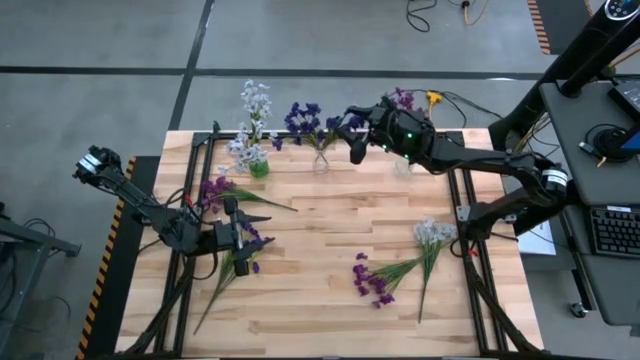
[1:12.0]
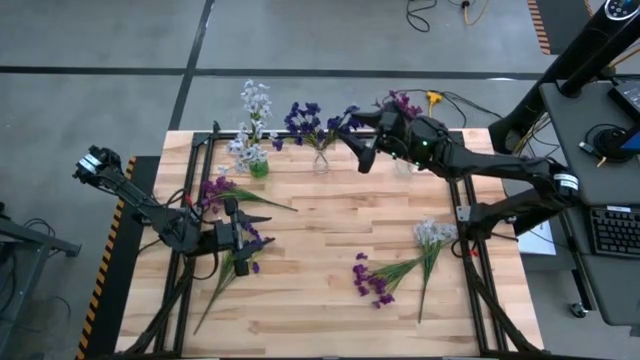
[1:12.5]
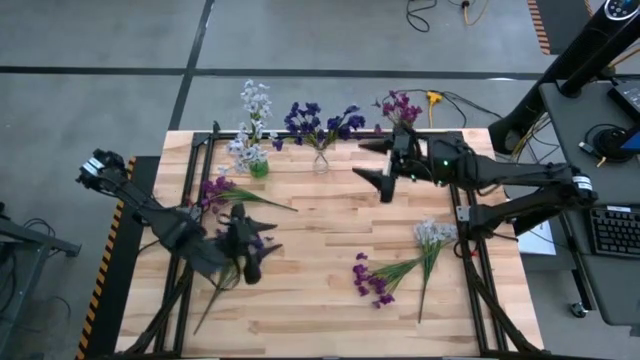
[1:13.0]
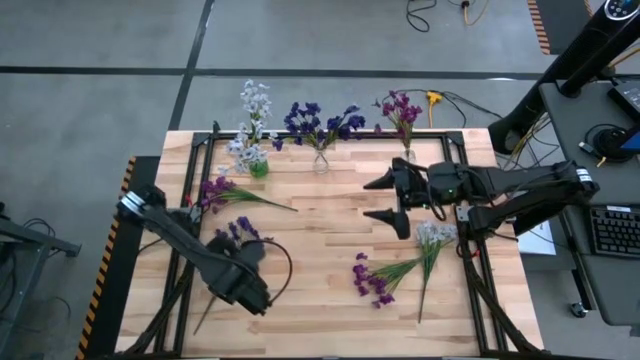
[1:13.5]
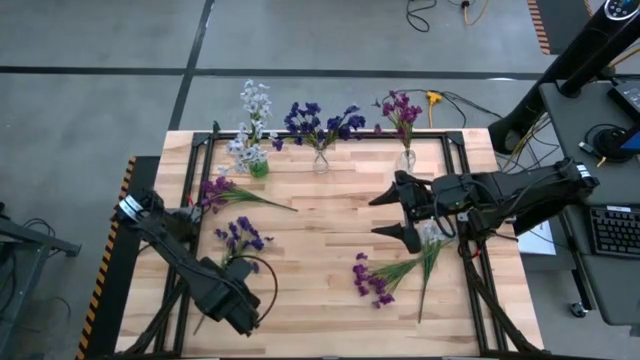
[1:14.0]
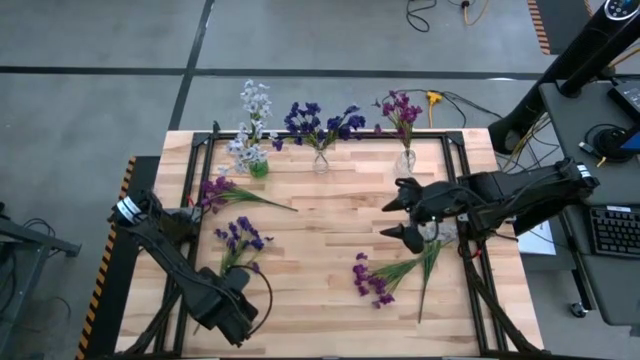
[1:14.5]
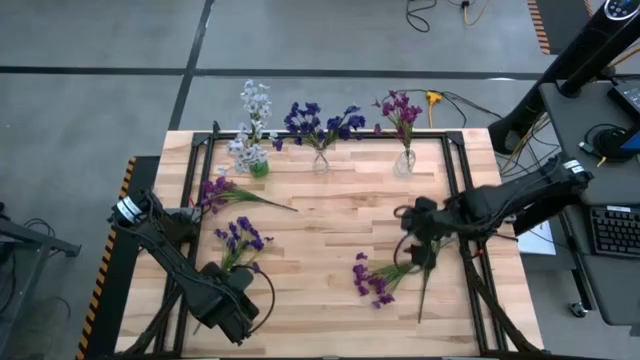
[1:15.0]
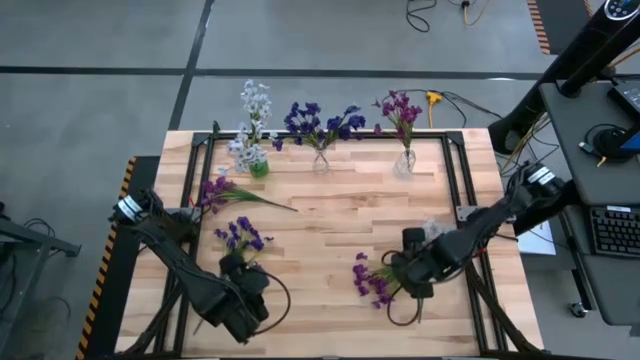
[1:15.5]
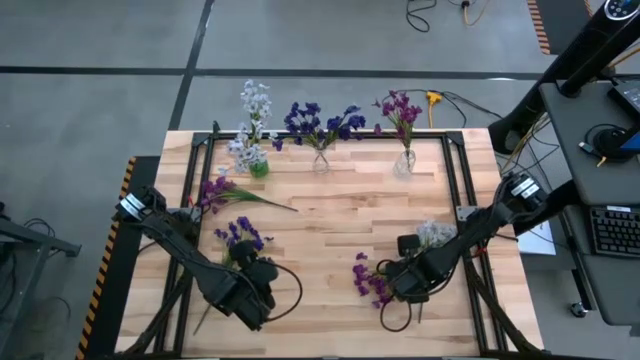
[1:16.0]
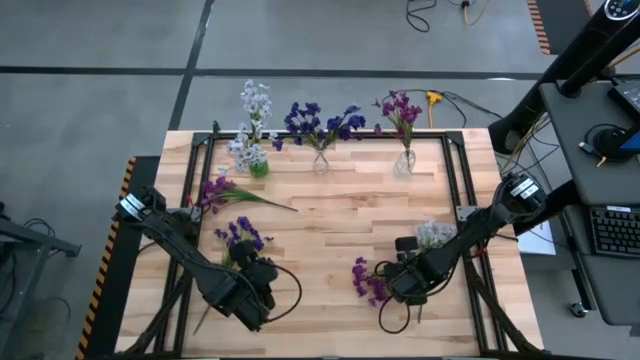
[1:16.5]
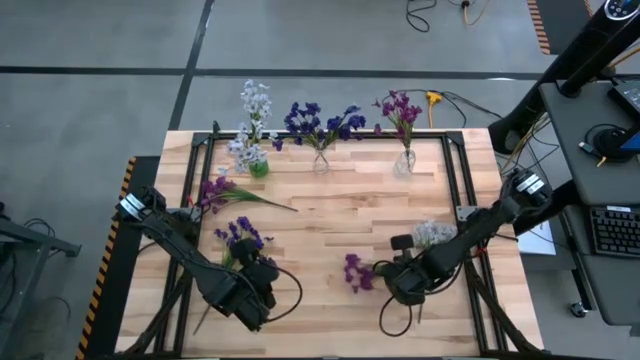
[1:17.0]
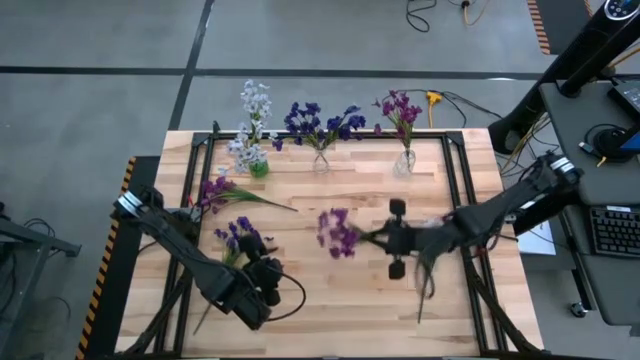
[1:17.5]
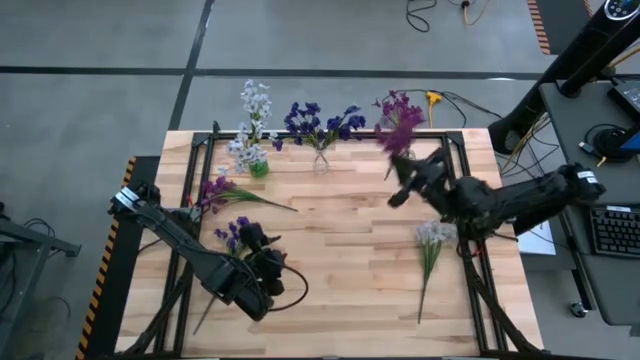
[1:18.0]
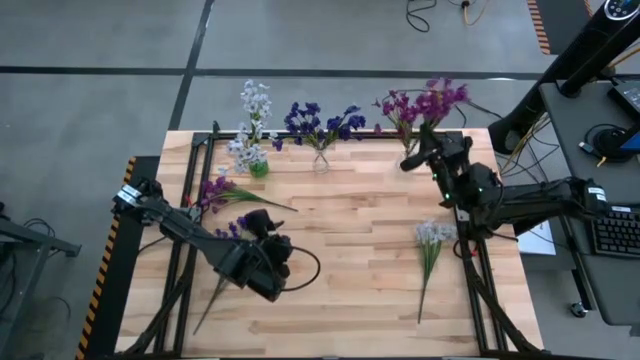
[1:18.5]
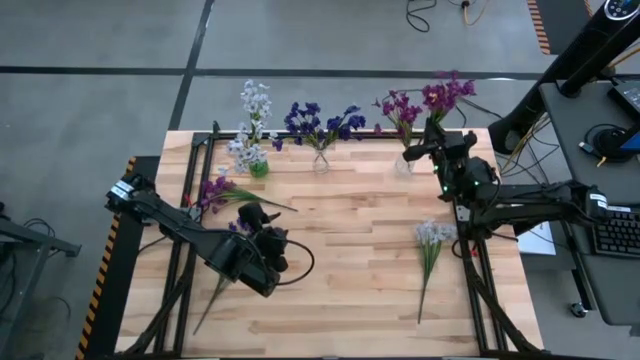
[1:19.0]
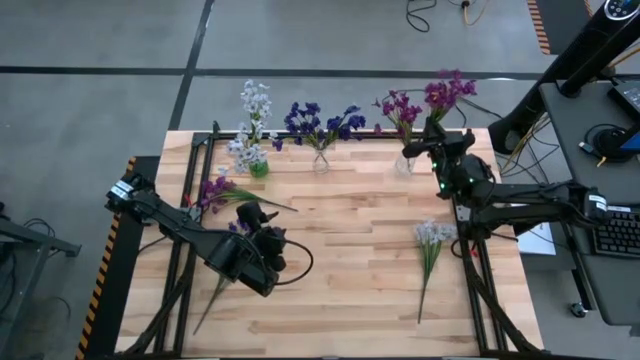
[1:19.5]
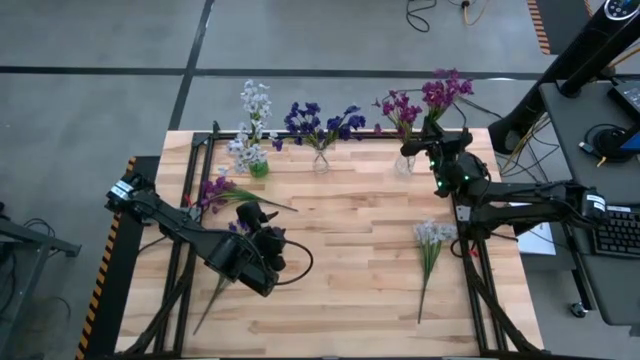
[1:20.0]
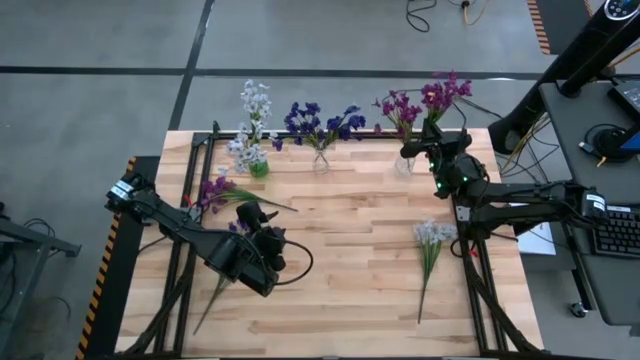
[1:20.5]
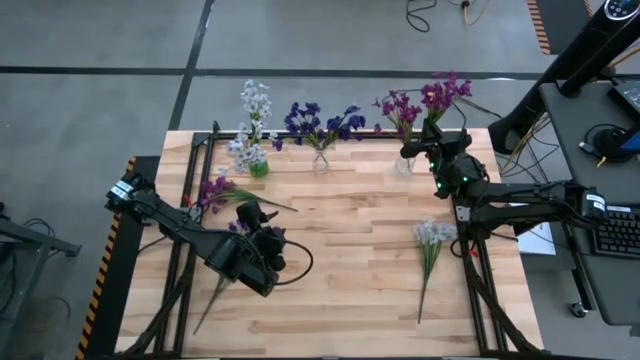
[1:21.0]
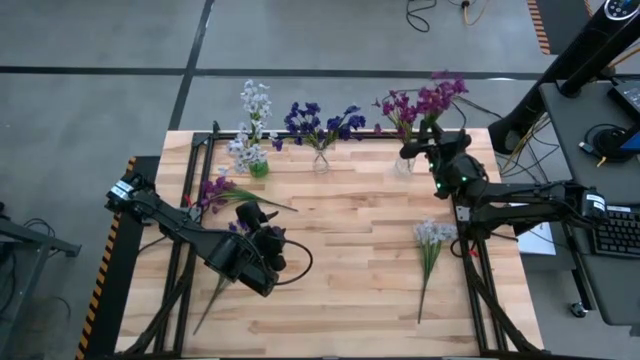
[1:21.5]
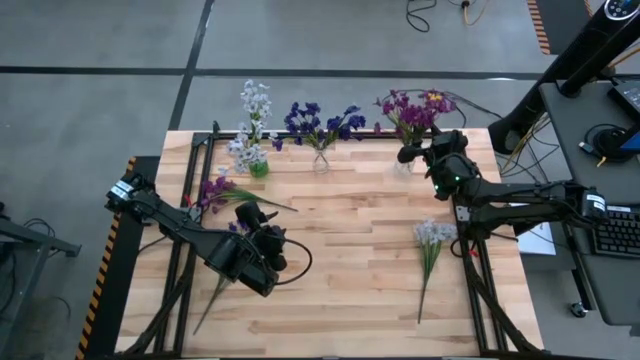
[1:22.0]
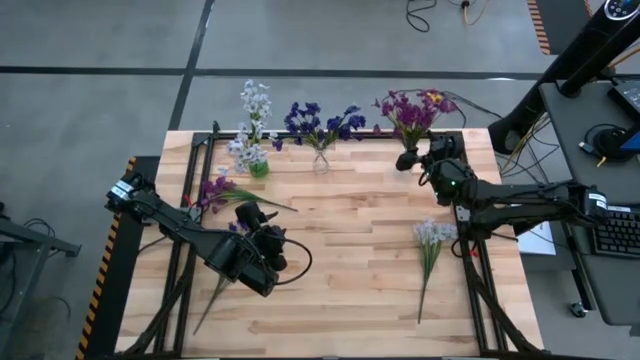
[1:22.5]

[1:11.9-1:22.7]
Task: Sort flowers into vase by color
Put the right light violet flowers into the right transparent vase

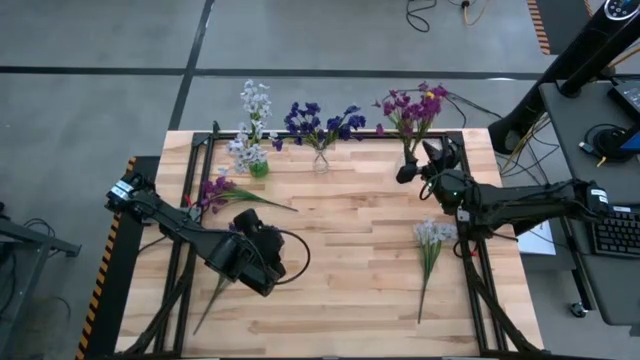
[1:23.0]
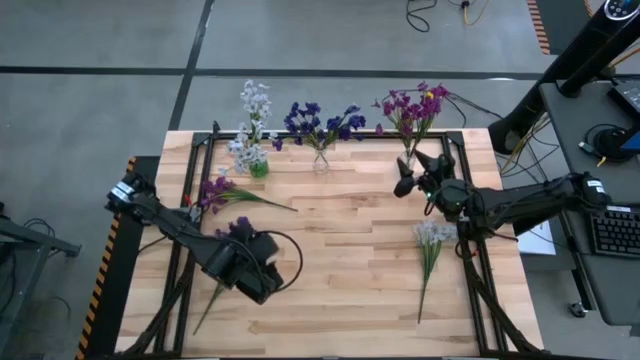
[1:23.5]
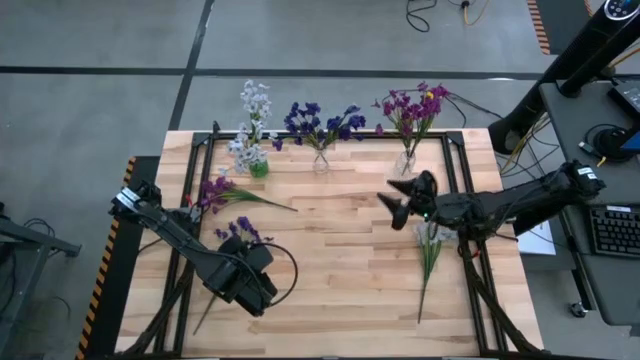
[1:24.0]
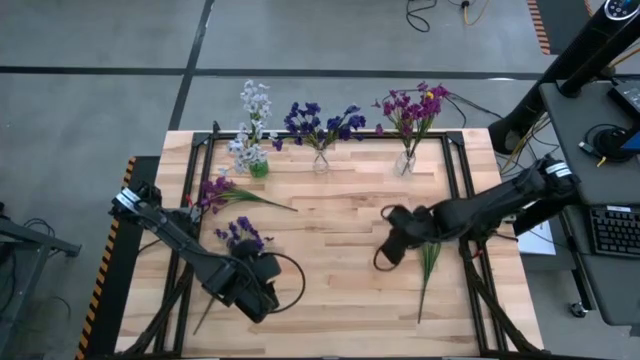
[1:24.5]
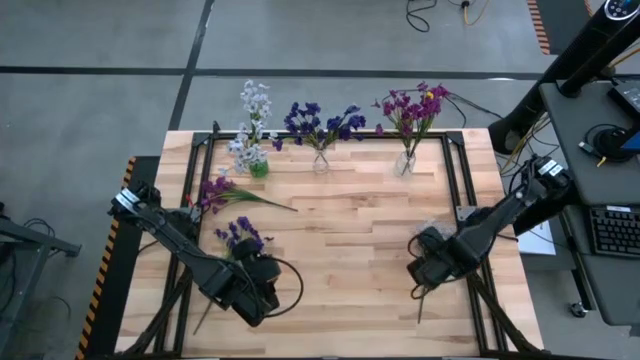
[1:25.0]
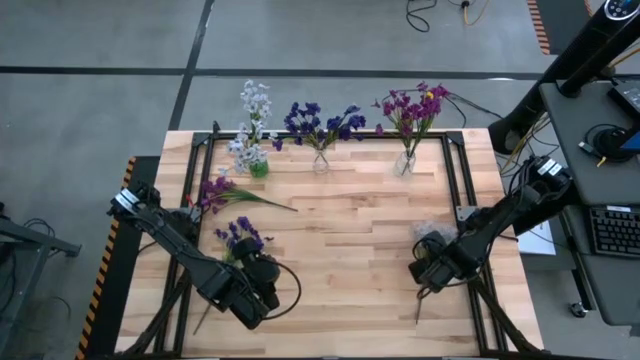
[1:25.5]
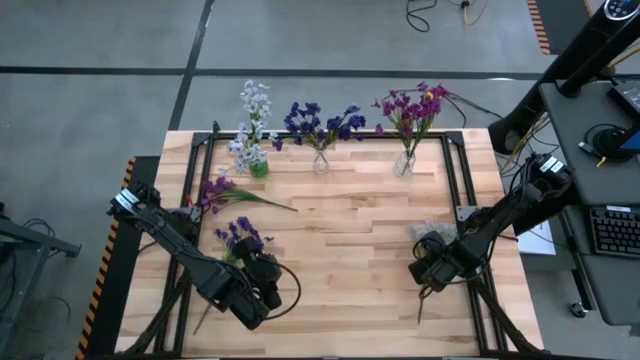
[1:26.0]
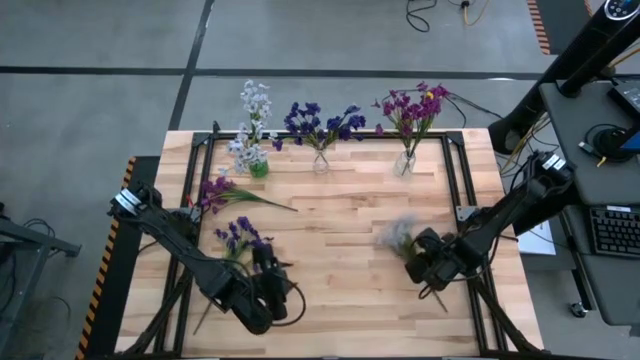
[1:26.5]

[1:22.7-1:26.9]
Put the white flowers into the green vase

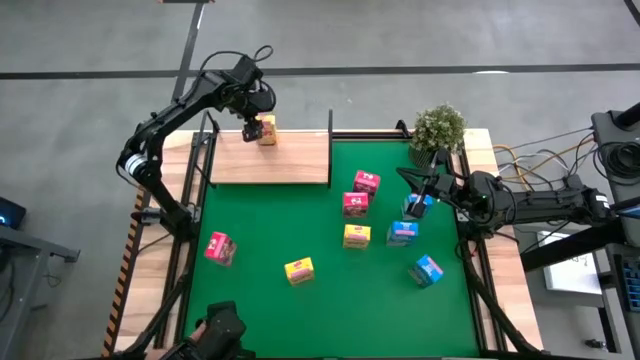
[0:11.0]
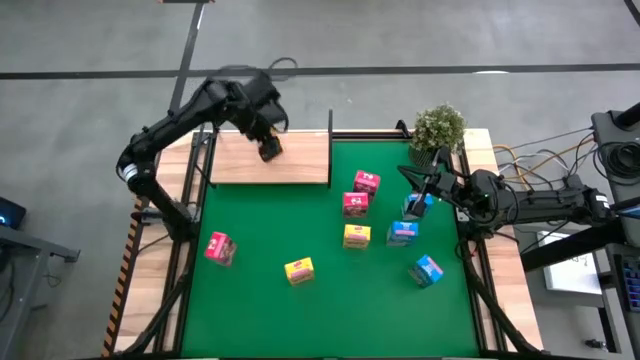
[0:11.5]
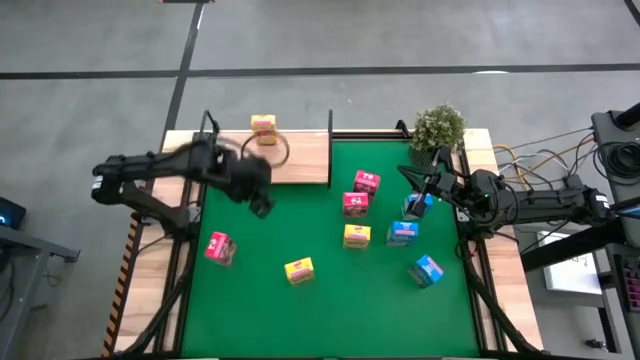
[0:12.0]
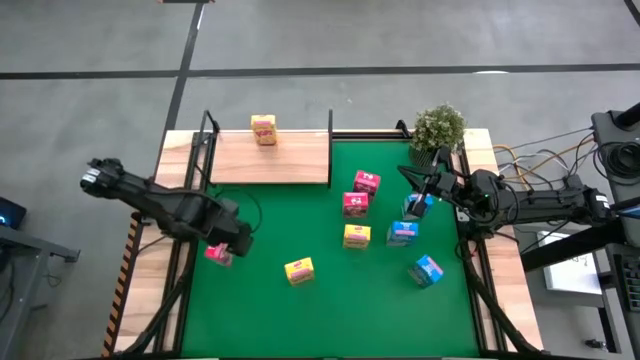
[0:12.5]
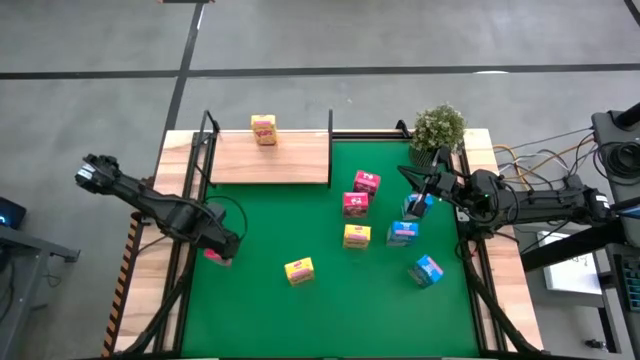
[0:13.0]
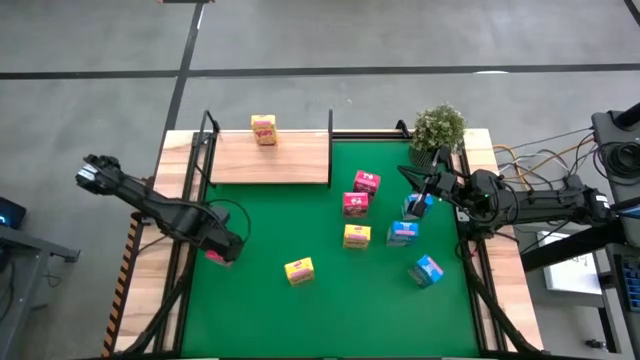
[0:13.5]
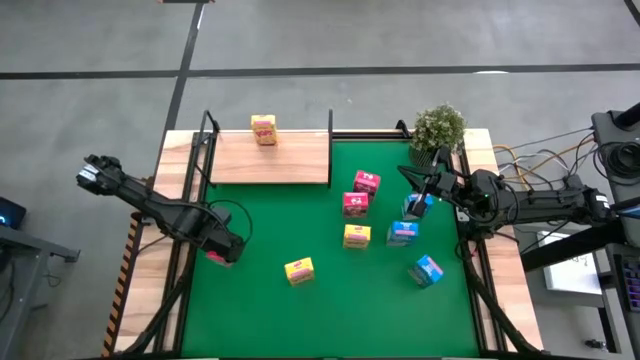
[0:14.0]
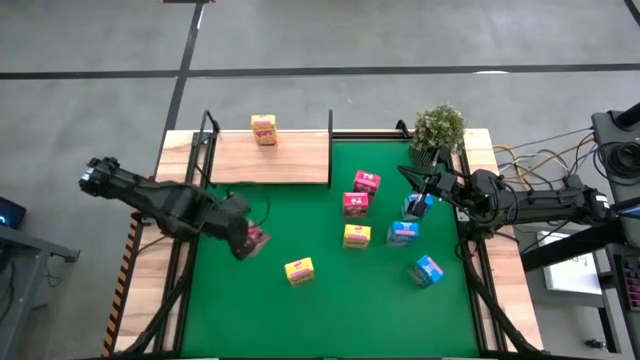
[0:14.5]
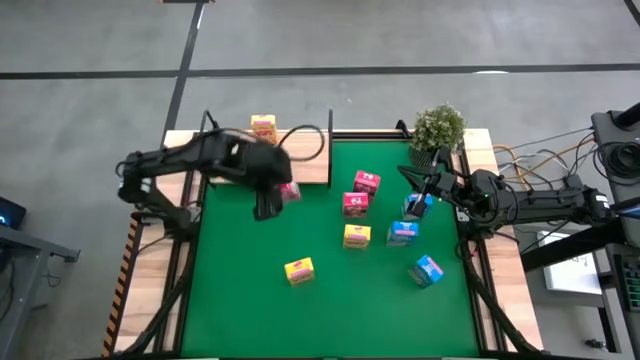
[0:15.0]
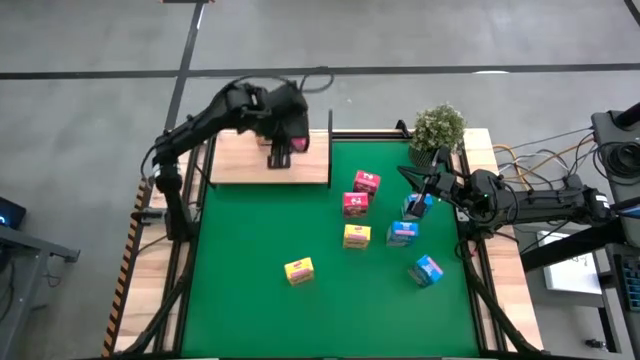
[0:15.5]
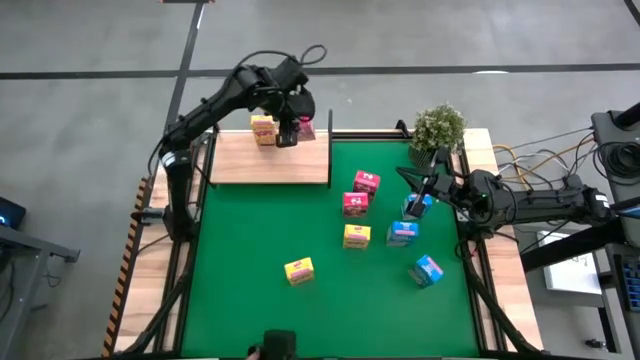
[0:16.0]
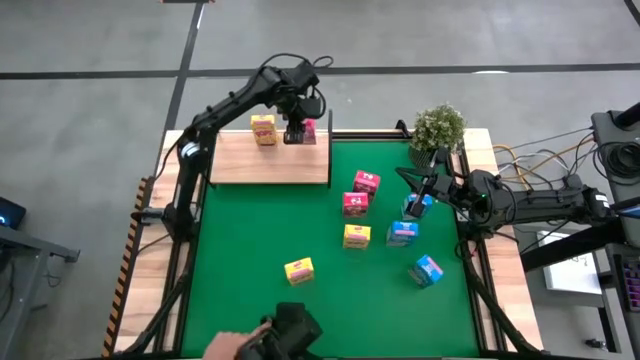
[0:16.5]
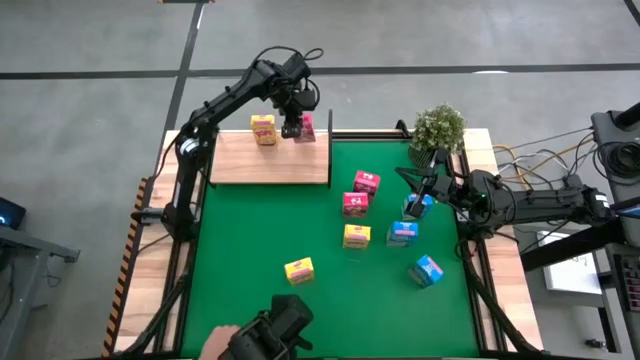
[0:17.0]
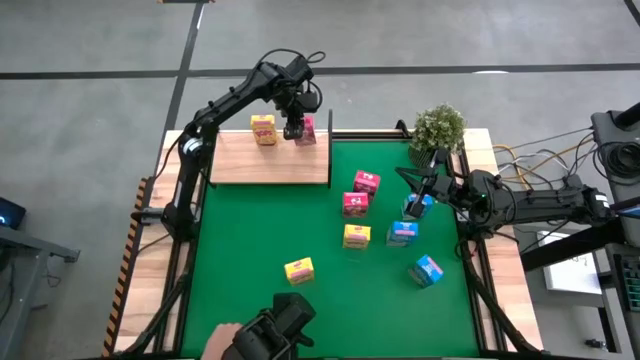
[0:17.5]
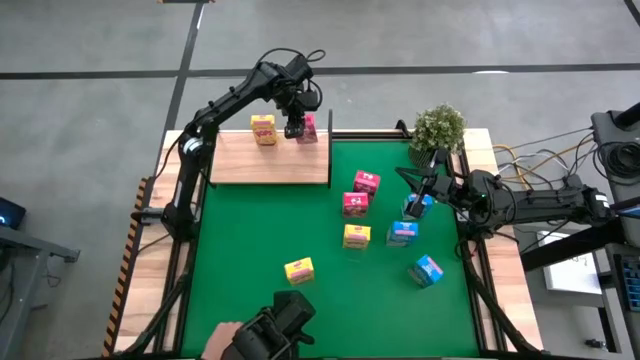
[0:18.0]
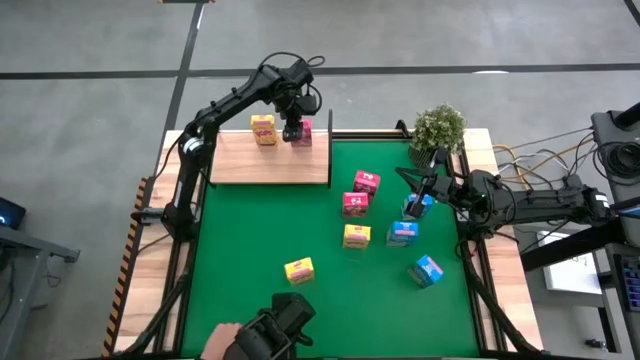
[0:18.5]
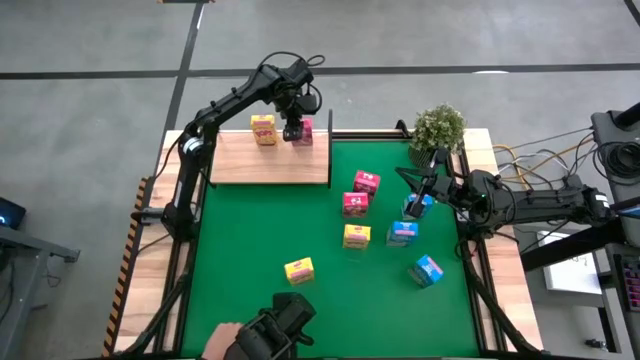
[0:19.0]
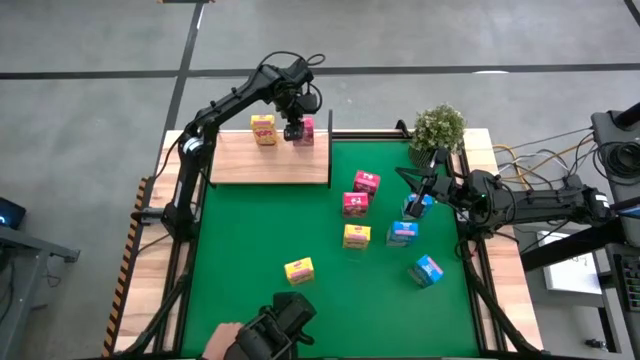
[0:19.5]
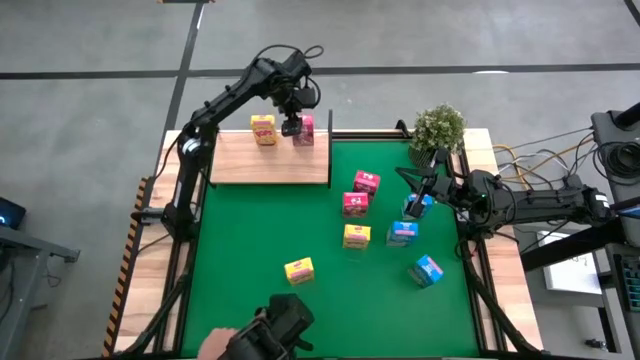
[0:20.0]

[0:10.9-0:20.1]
Task: Stack cereal on shelf
Put the bottom red cereal box on the shelf
